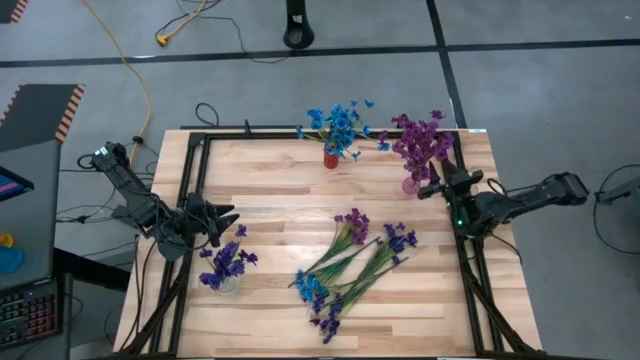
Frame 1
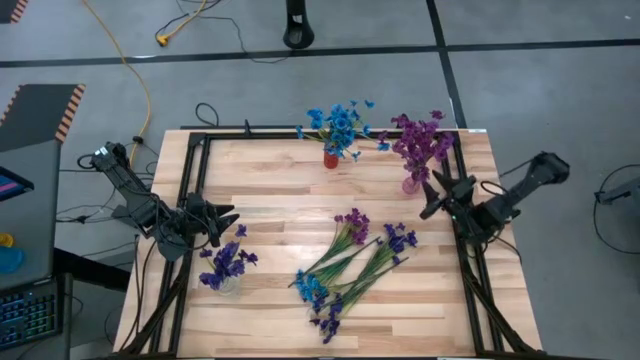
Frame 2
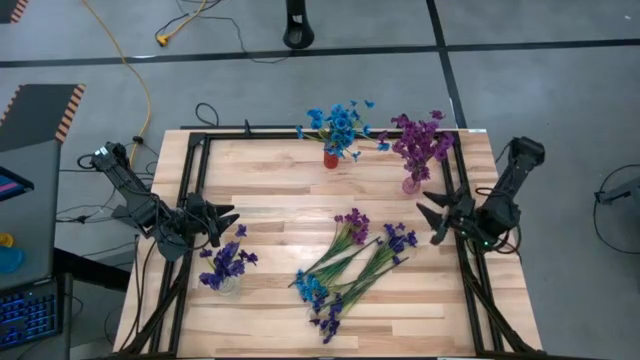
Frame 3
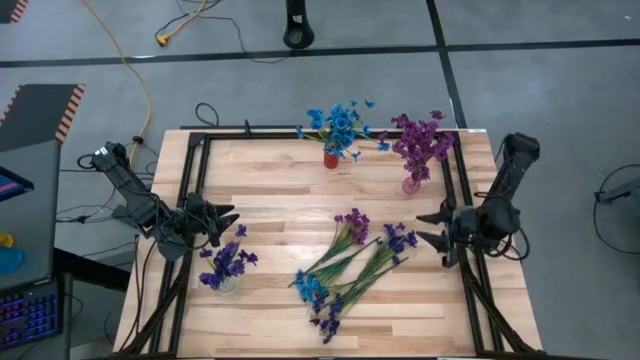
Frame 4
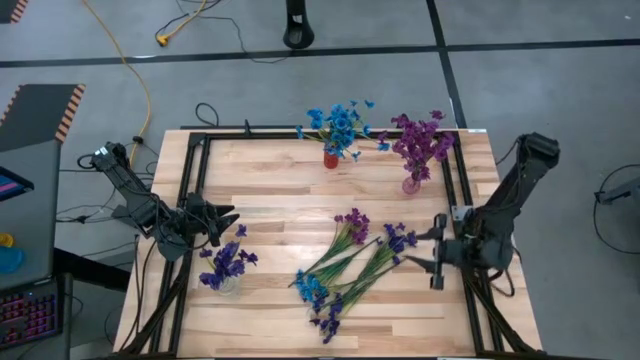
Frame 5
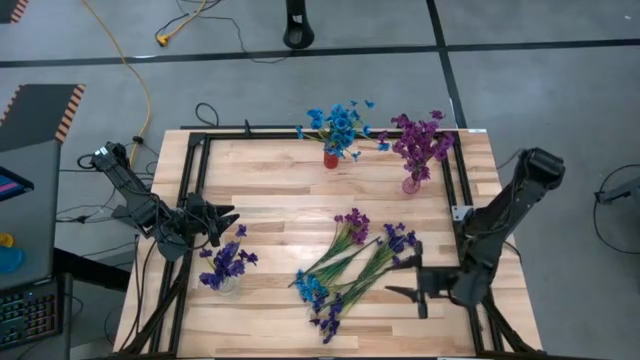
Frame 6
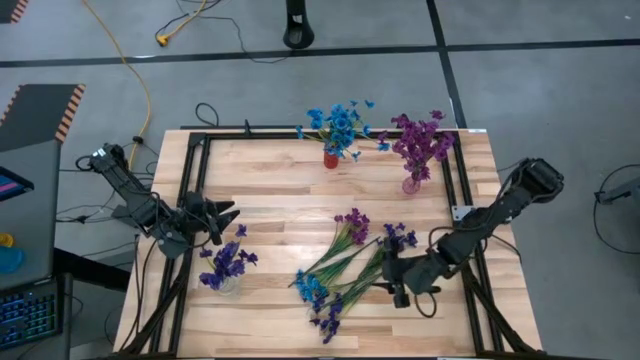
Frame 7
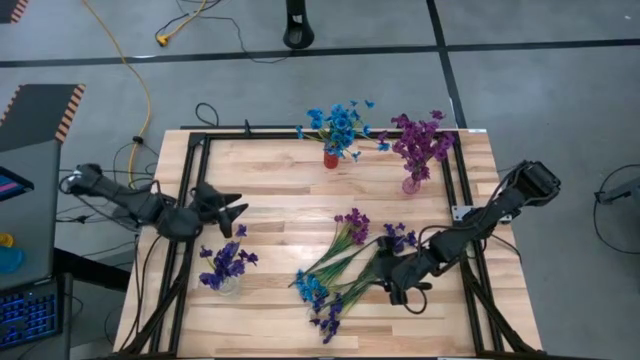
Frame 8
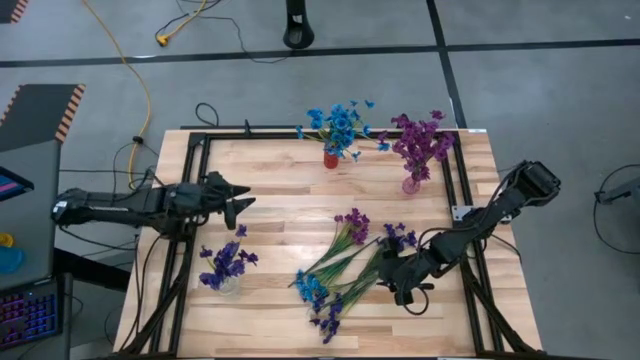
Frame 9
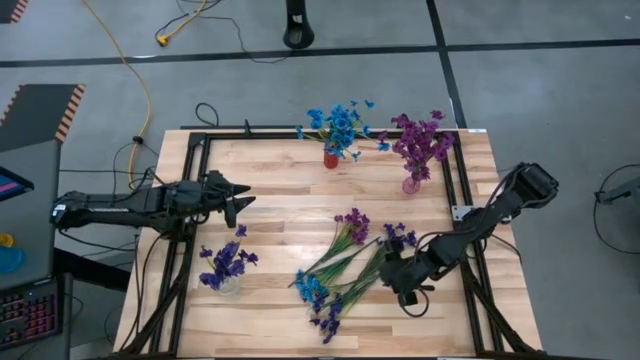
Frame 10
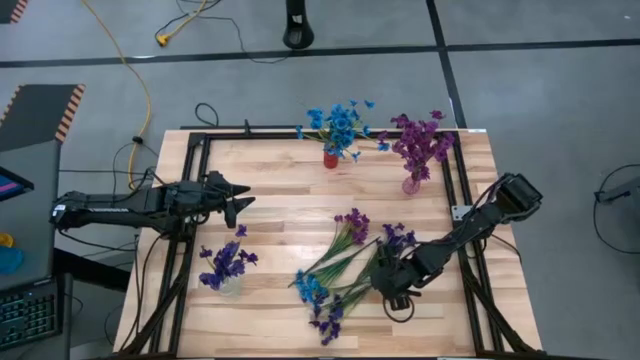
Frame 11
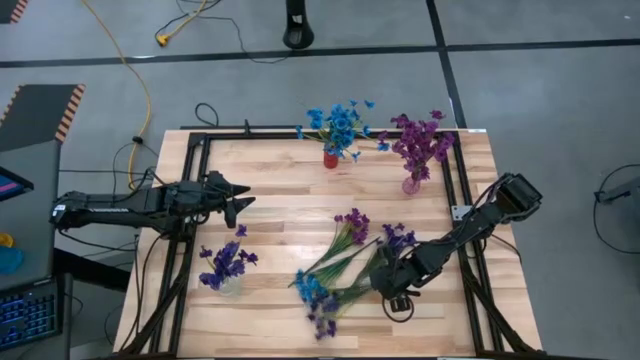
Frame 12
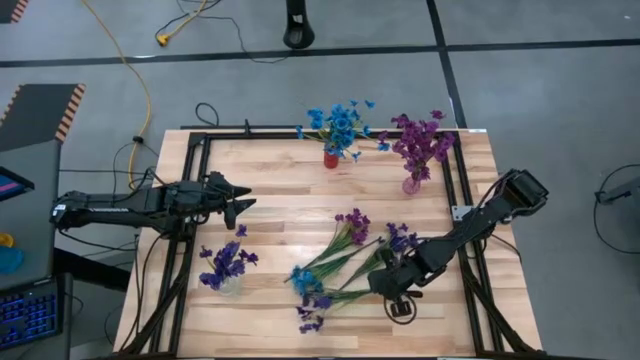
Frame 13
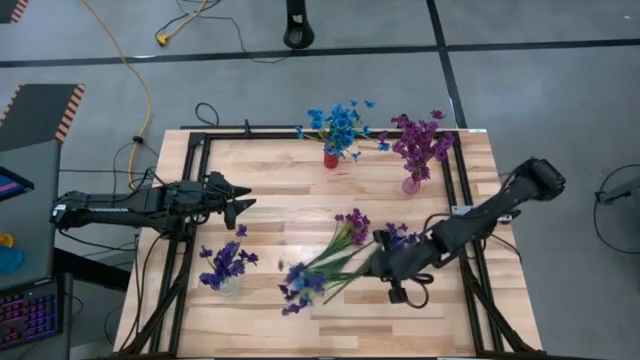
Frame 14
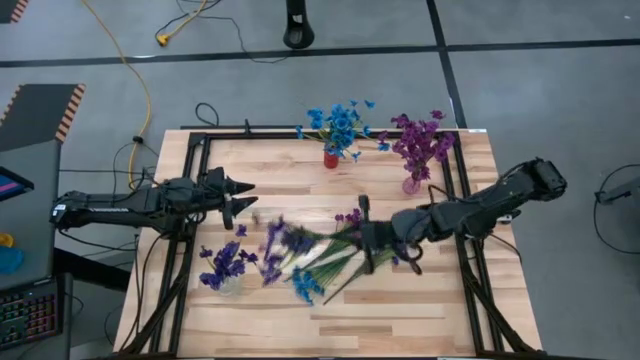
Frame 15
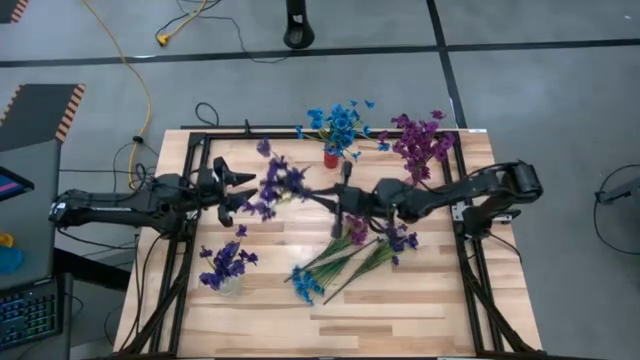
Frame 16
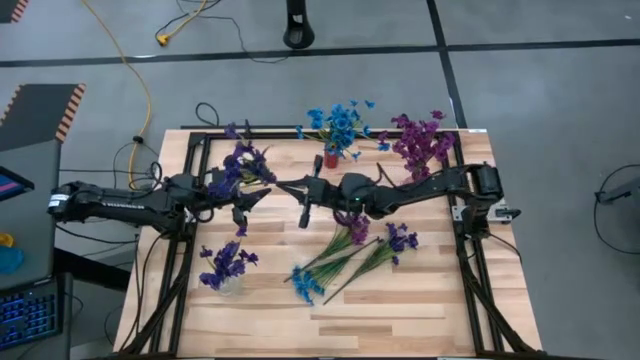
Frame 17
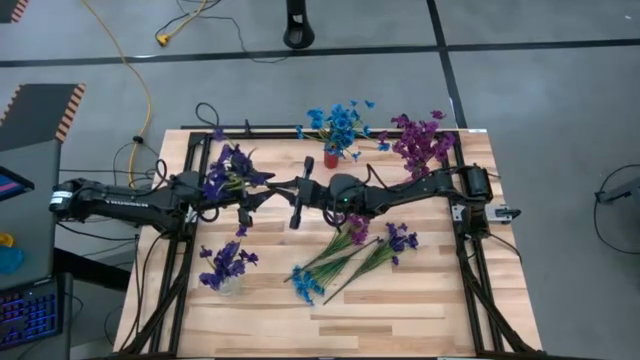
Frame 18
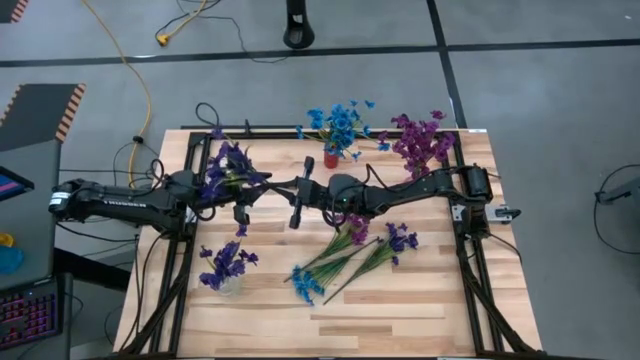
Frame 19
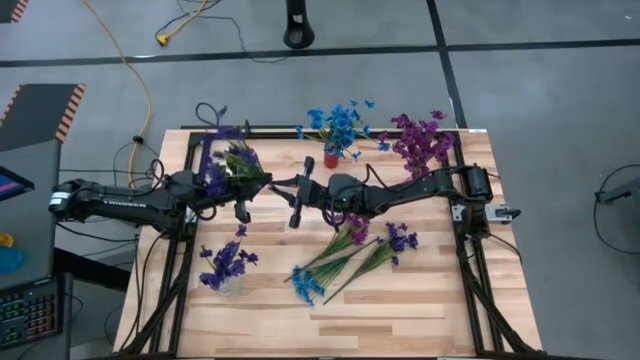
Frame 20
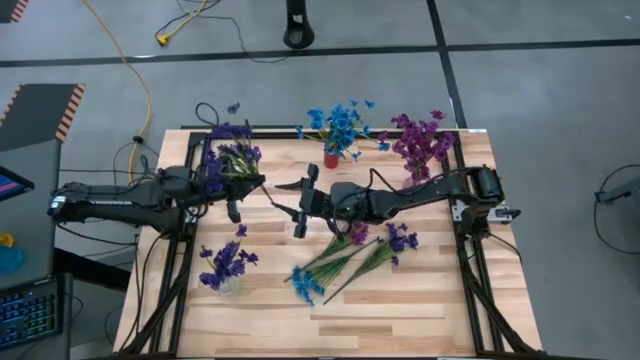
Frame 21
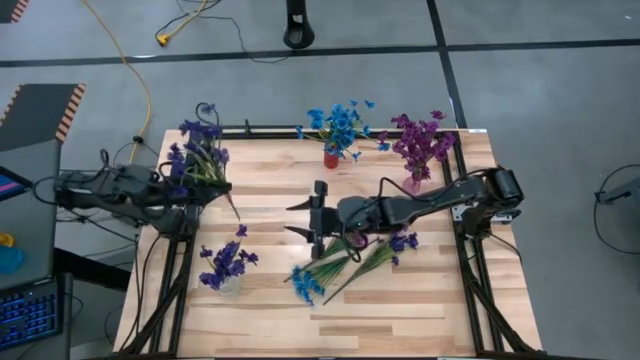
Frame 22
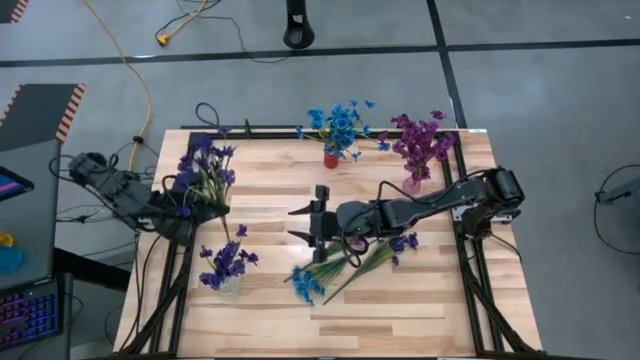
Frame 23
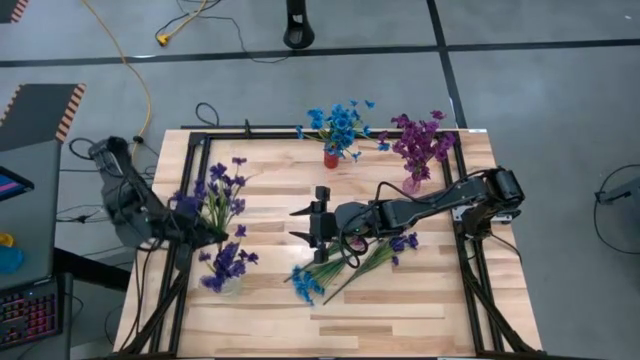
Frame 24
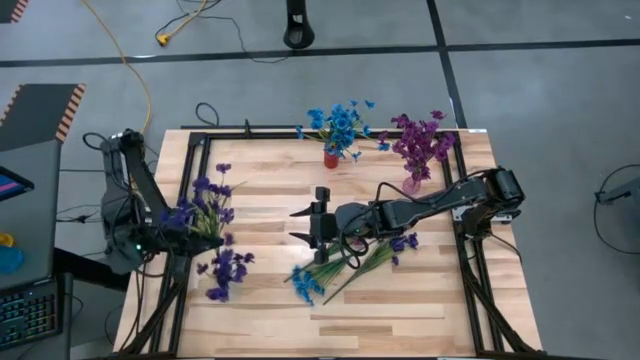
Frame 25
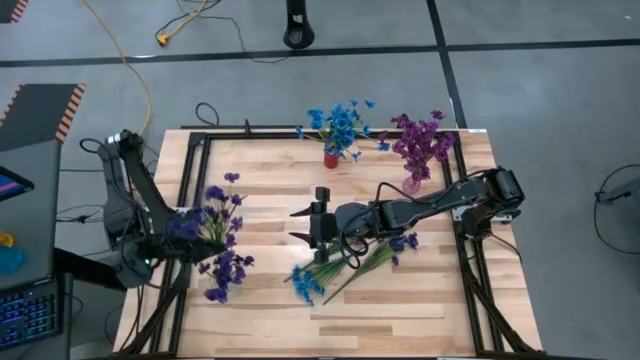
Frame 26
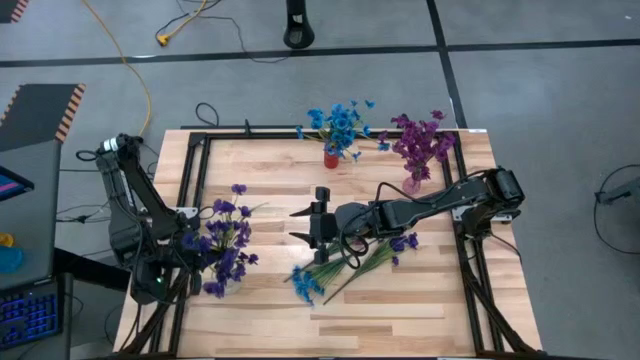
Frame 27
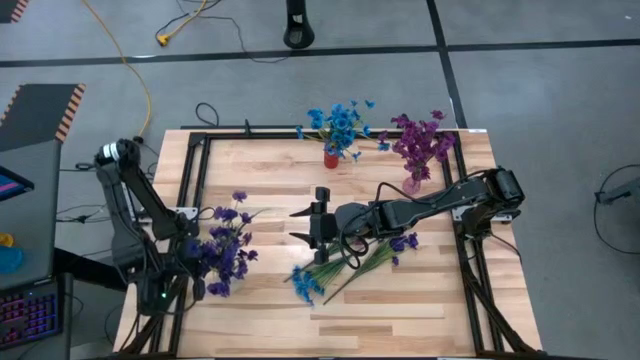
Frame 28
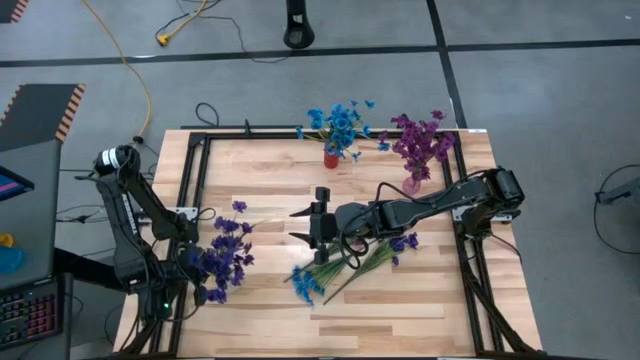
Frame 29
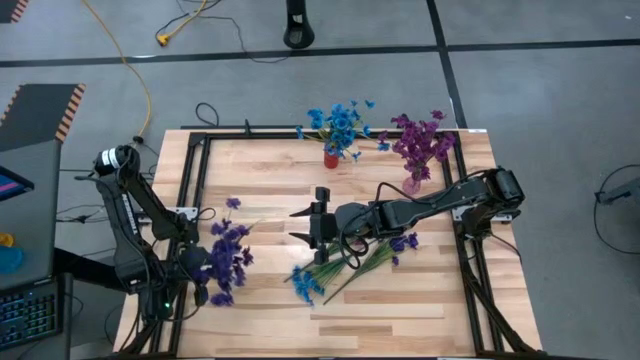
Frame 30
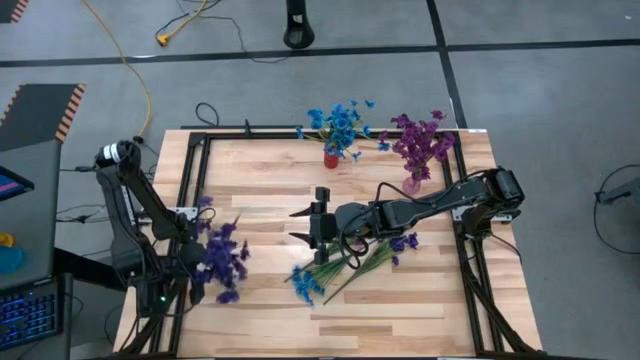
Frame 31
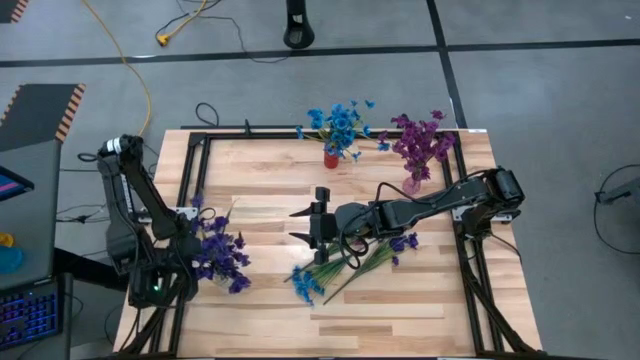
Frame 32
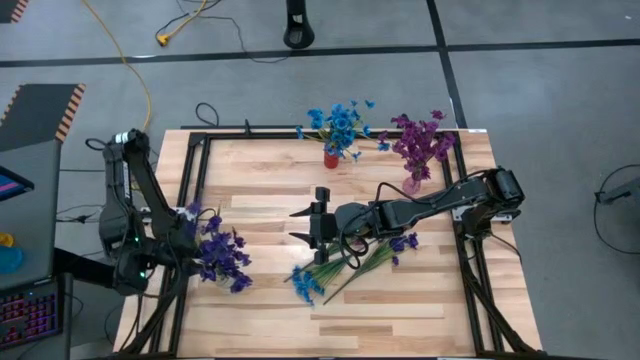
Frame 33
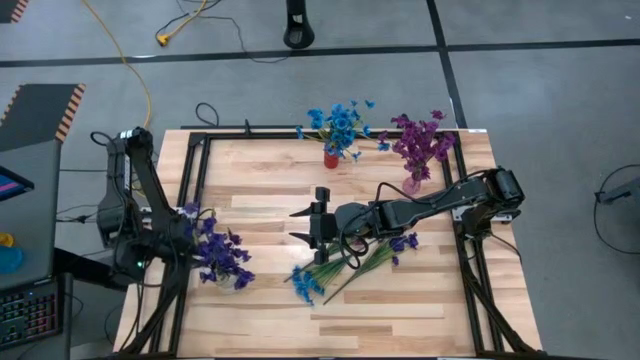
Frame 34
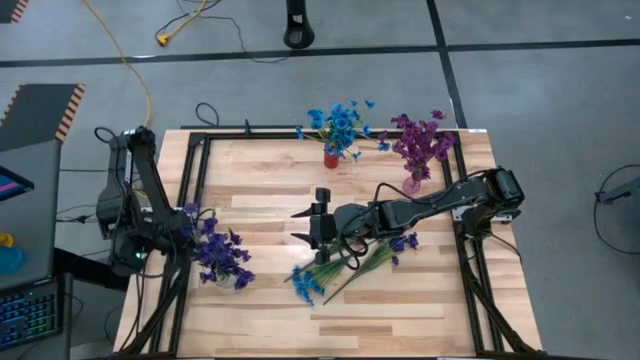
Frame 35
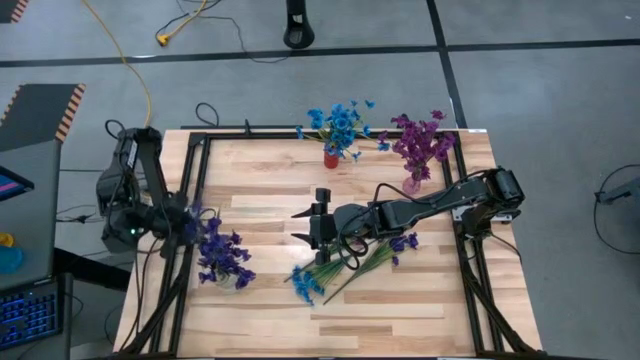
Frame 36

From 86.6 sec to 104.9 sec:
Task: Sort flowers into vase by color
Put the bottom dark blue flowers into the transparent vase

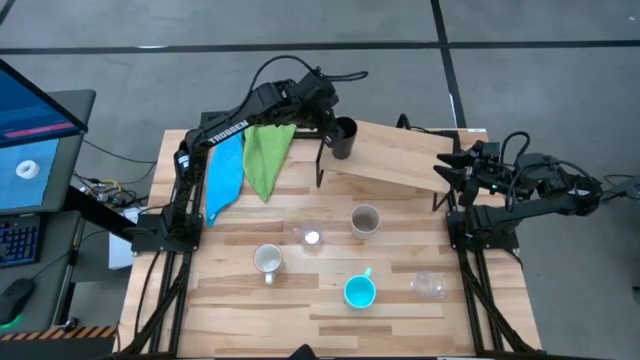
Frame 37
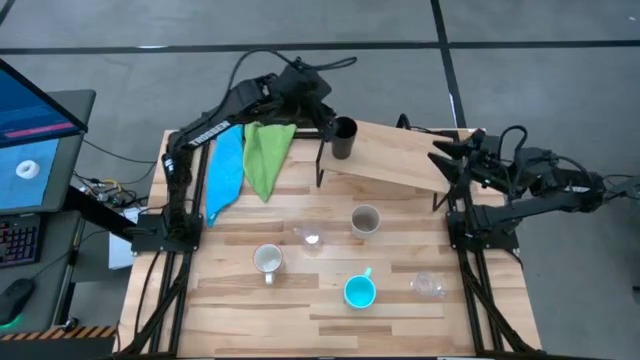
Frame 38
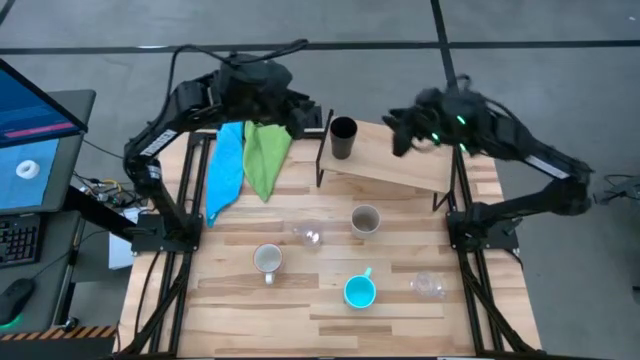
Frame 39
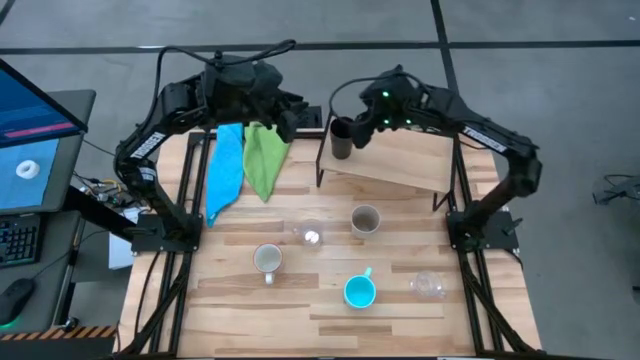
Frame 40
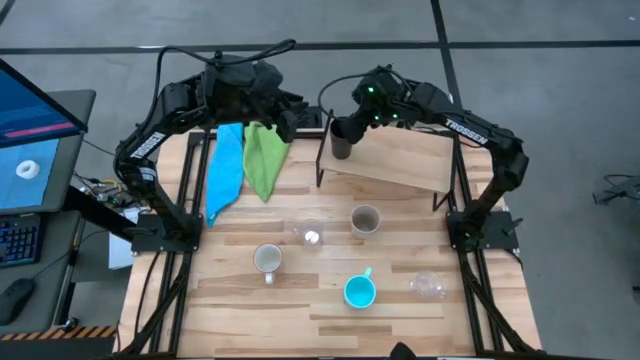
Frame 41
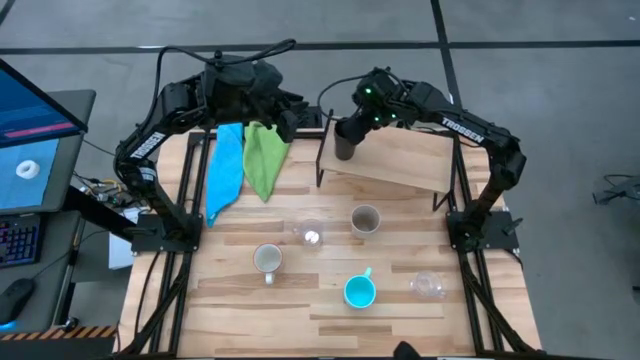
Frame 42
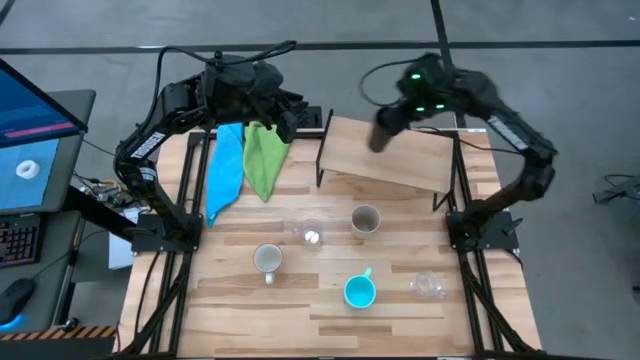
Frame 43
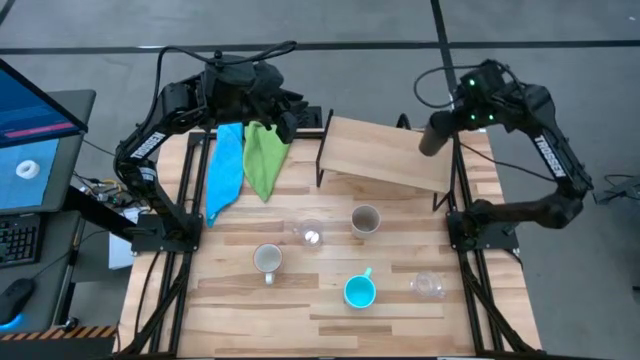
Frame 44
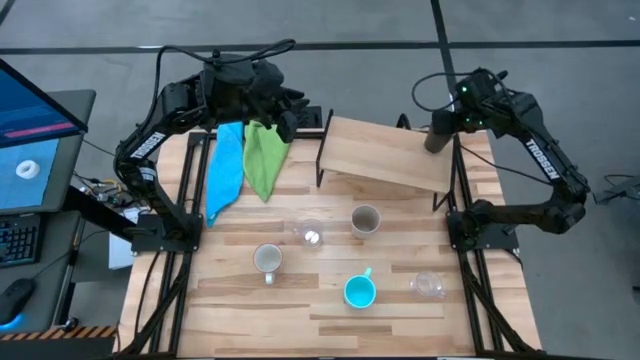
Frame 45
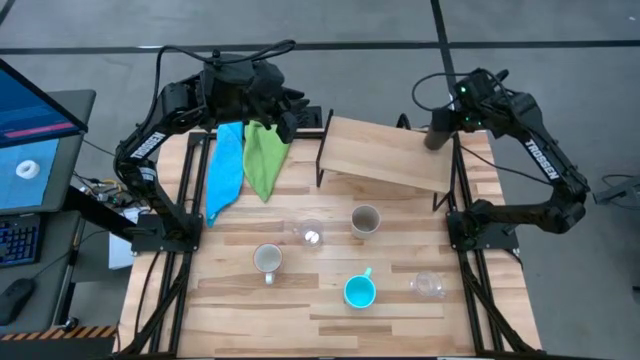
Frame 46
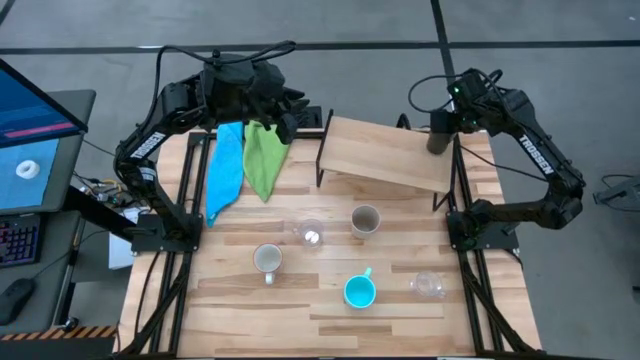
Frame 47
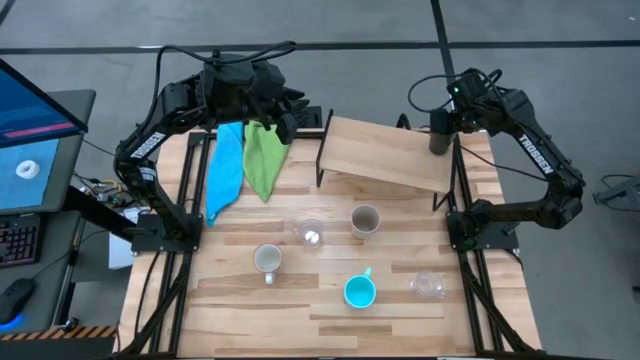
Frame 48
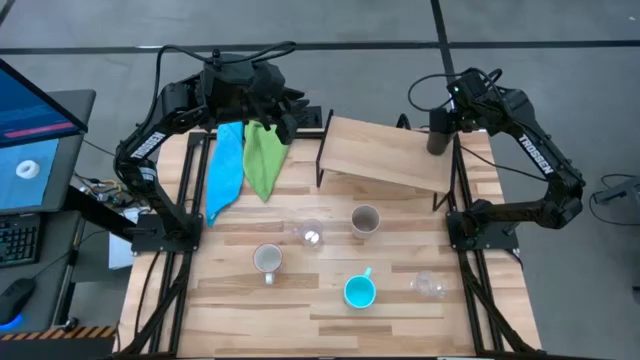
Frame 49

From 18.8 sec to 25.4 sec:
Task: Stack small to large cups/mugs on shelf
Move the black cup to the top right of the shelf
